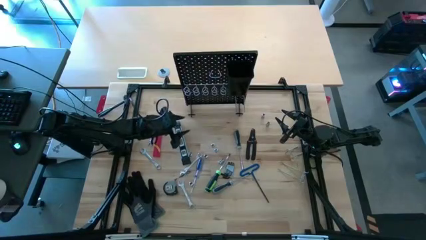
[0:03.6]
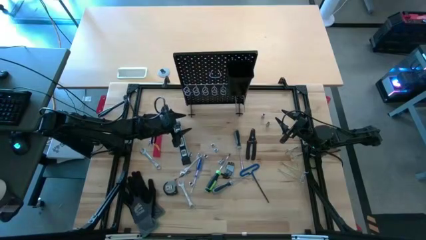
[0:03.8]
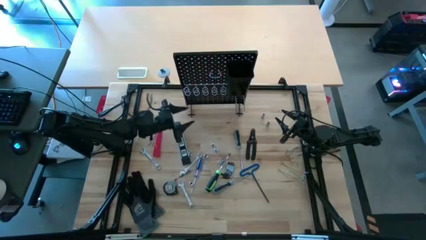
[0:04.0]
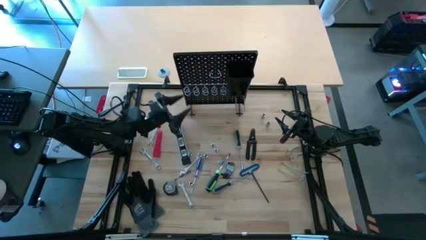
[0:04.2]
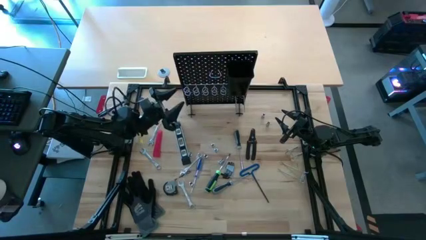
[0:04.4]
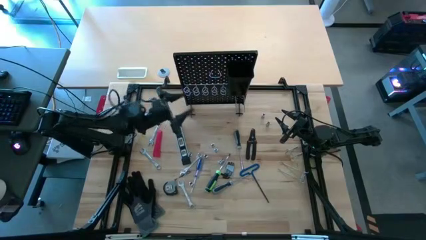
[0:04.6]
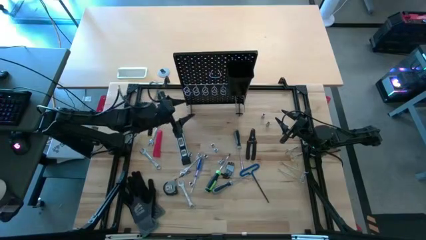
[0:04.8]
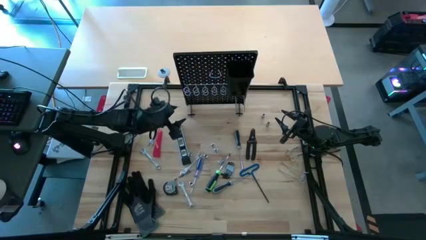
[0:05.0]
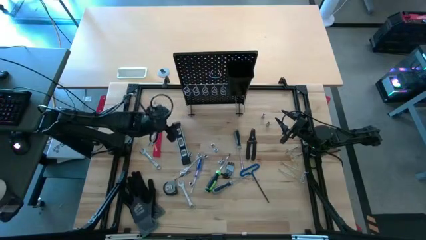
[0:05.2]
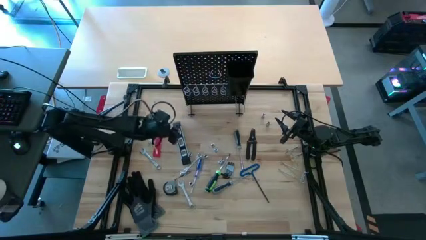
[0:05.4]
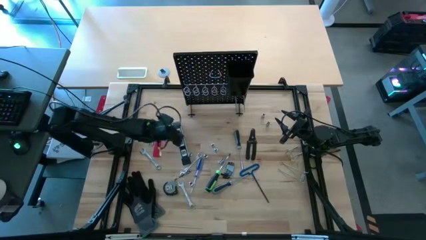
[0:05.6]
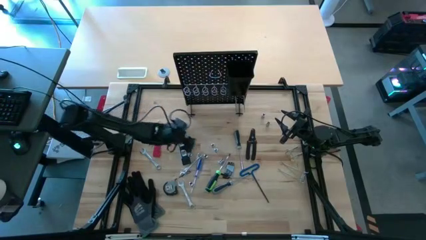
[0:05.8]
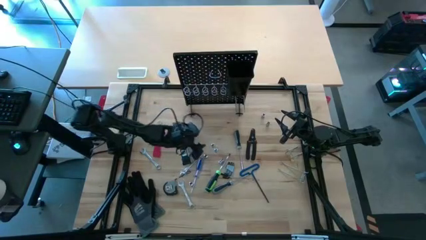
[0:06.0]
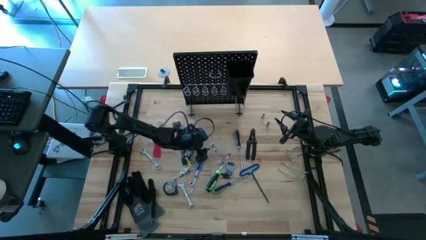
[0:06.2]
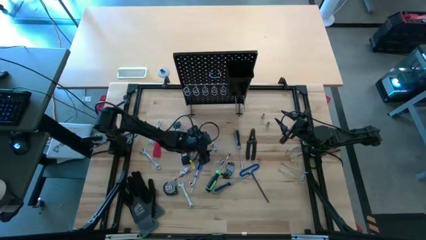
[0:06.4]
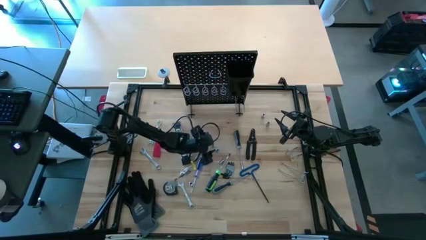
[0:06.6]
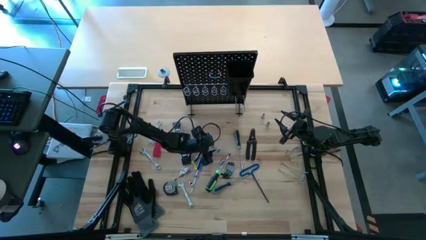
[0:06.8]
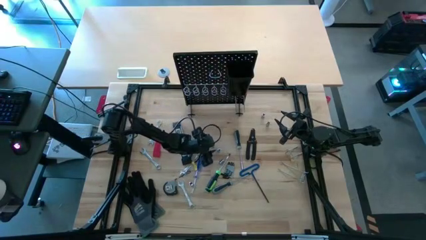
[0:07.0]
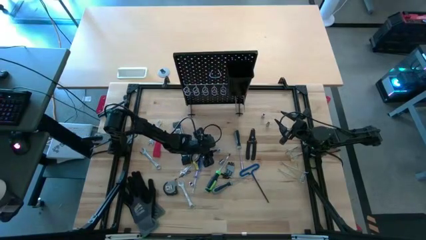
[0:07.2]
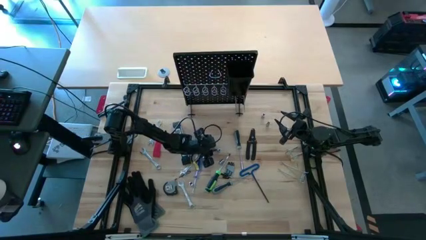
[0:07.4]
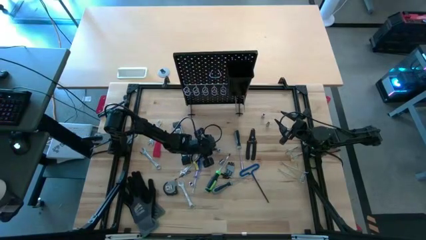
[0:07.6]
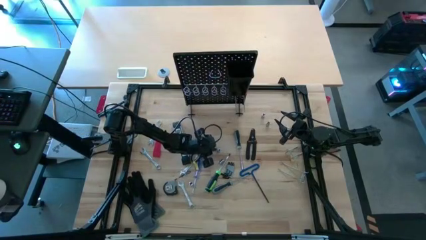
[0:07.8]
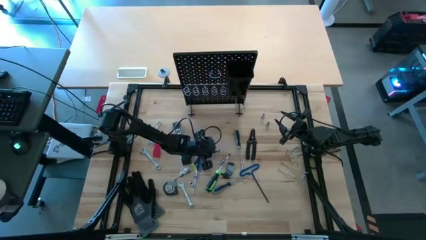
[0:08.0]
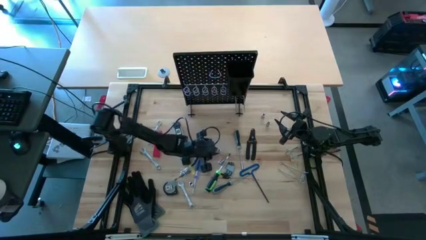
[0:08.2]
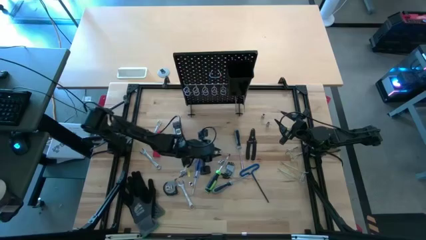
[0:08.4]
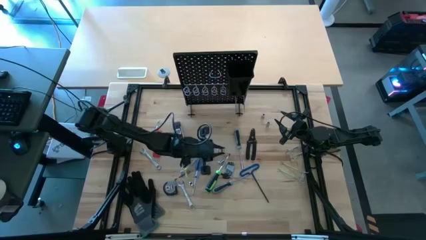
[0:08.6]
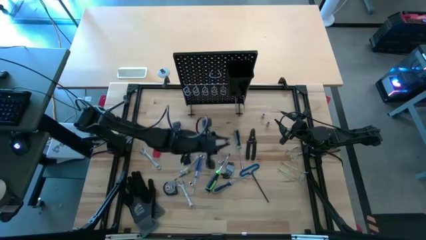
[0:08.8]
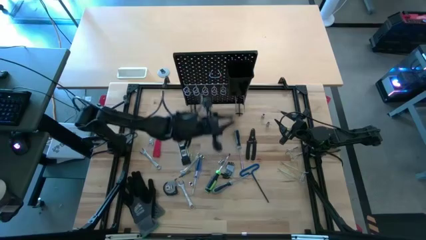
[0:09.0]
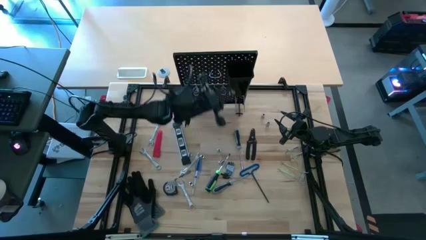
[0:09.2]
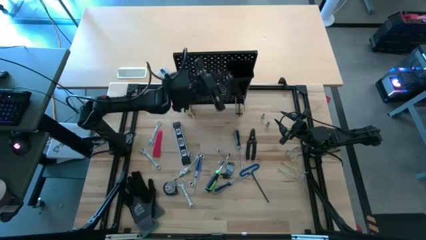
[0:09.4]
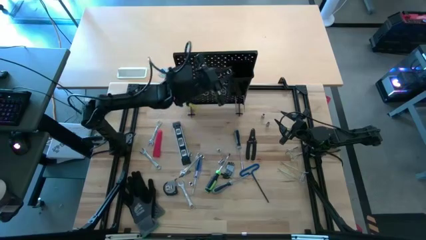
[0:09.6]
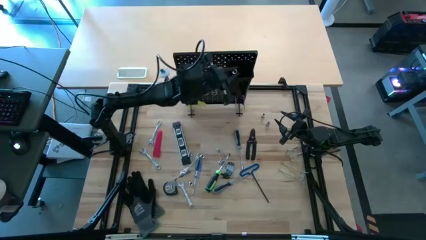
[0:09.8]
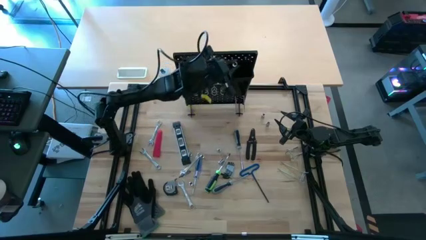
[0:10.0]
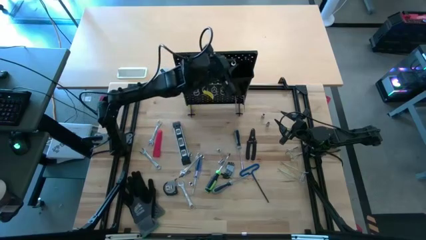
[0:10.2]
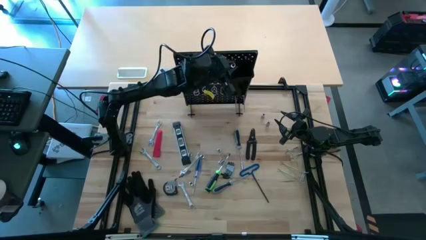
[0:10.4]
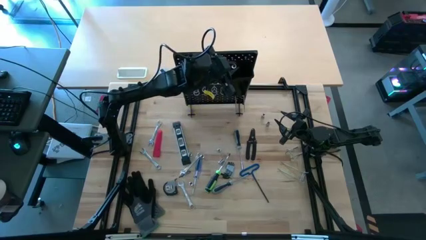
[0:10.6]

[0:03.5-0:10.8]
Task: Hang tools onto peg board
Put the socket wrench into the pegboard bin

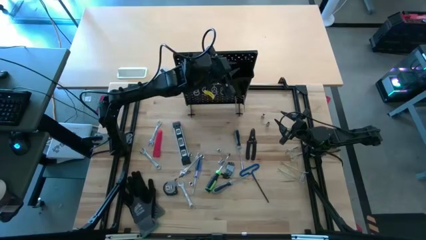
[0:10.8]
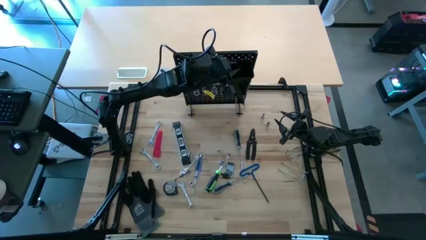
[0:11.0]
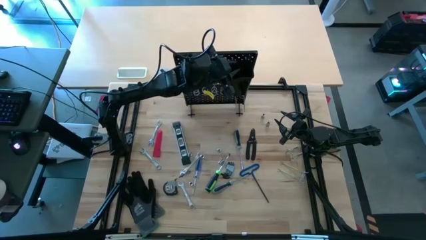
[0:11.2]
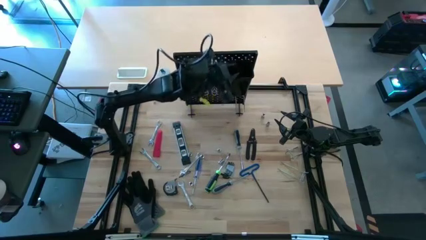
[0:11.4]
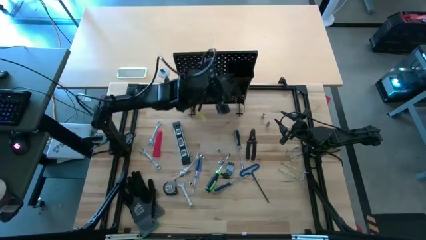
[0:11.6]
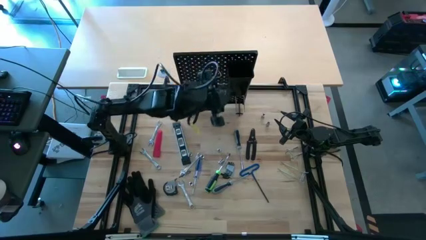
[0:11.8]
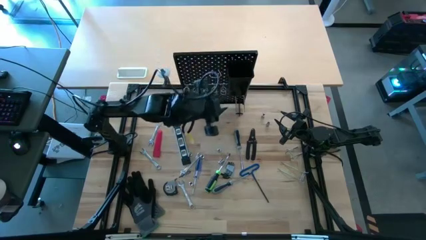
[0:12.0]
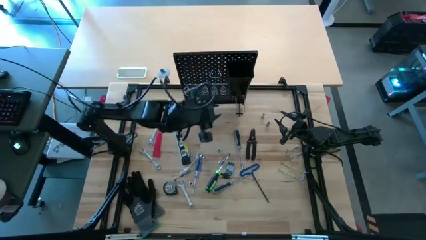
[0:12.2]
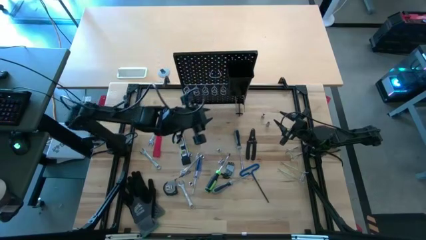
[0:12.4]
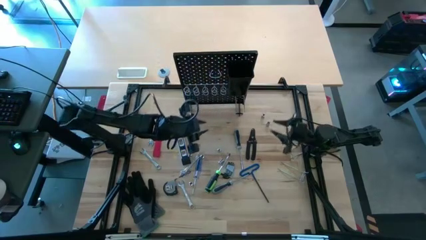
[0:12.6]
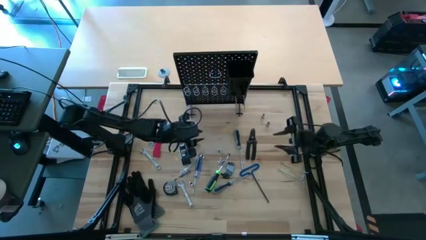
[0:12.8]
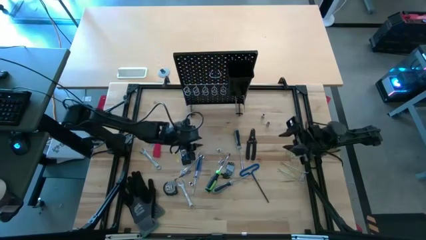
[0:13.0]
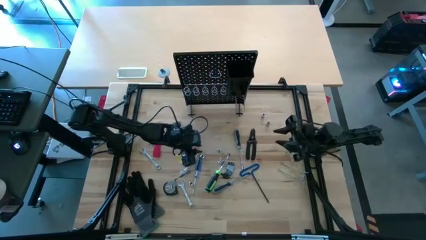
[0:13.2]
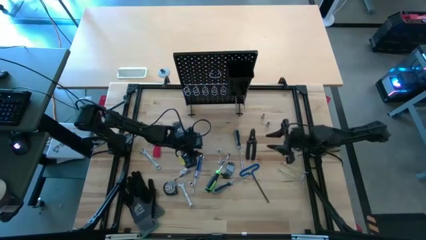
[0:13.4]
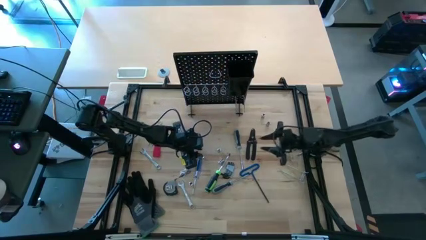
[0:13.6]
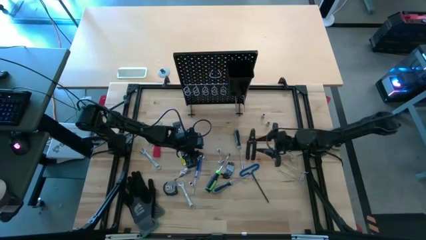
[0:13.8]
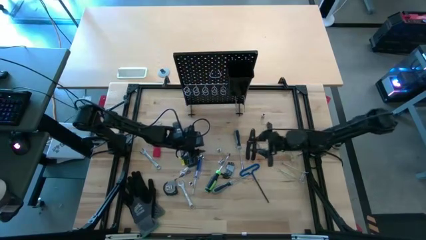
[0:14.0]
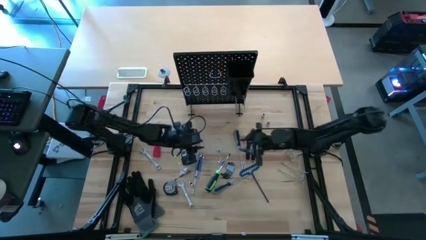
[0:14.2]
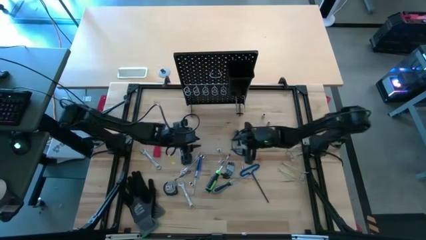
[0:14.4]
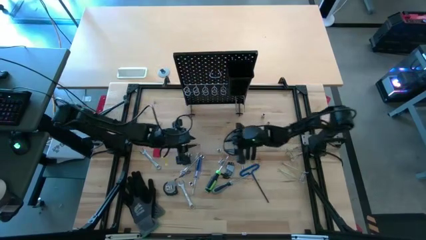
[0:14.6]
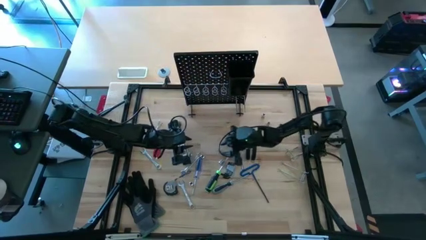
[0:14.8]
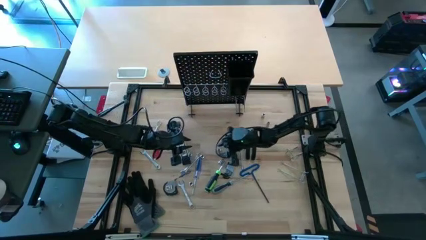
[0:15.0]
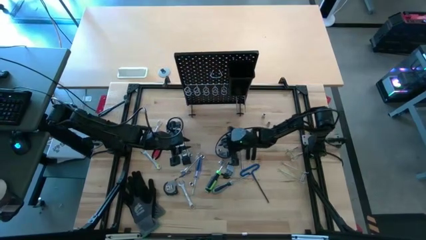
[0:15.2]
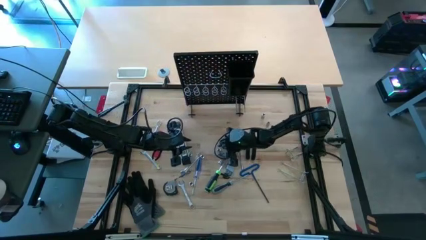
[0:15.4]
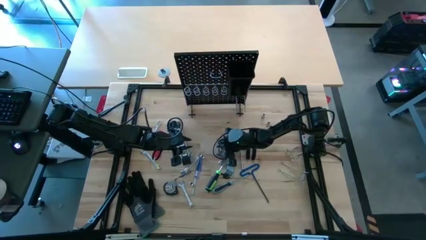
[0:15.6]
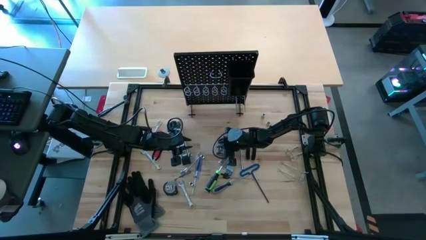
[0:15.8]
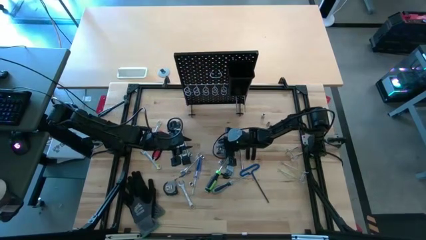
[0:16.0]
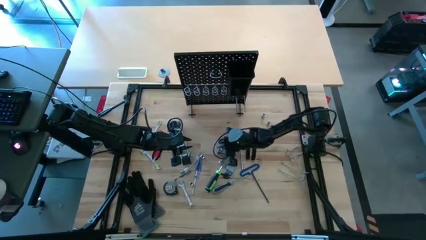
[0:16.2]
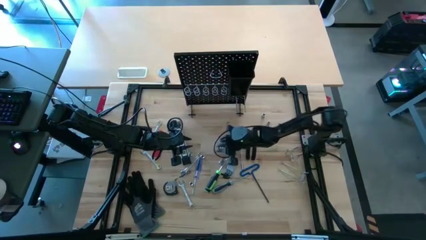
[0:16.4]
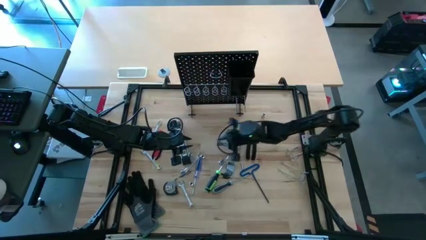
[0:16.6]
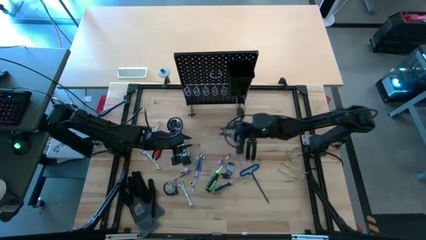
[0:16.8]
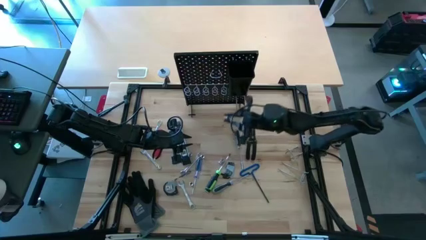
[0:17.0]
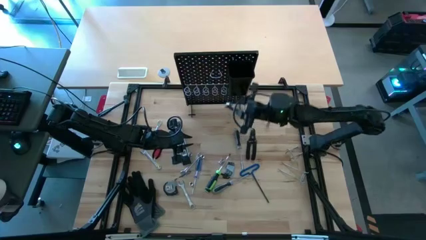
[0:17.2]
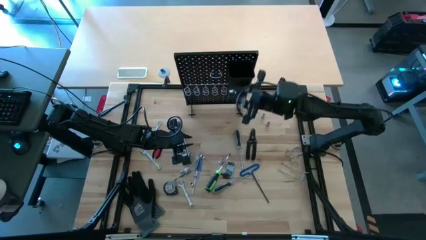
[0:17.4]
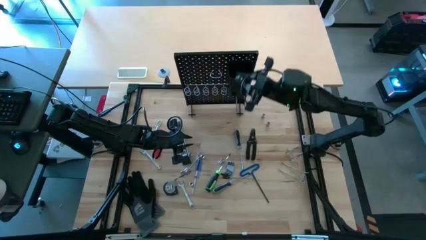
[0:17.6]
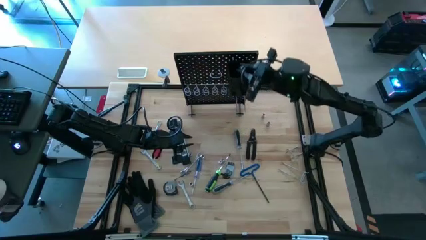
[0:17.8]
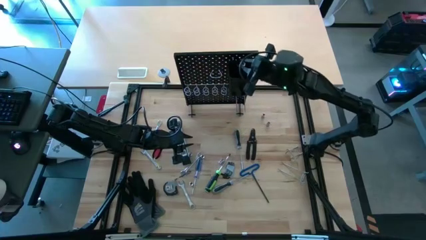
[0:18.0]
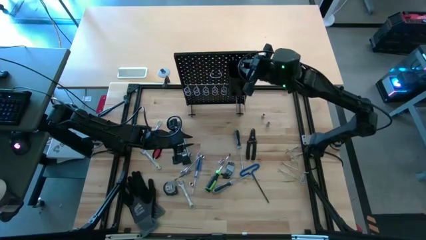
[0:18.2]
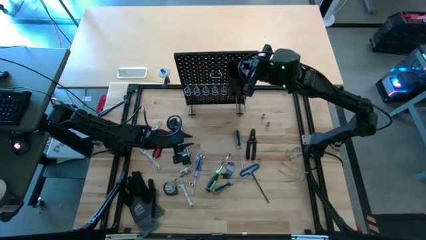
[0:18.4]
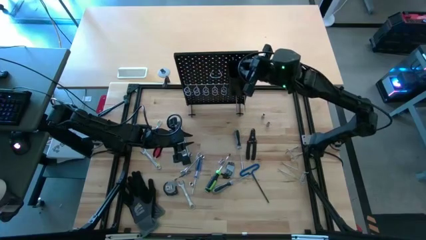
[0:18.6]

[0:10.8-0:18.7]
Put the socket wrench into the pegboard bin

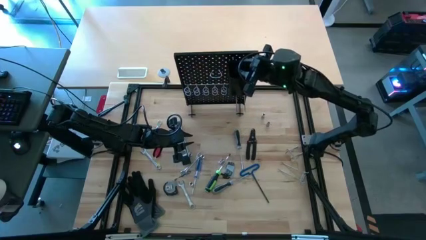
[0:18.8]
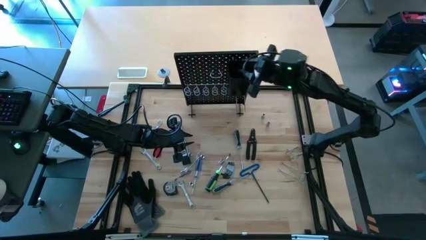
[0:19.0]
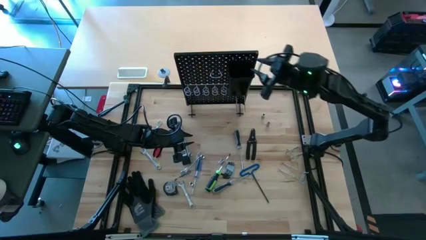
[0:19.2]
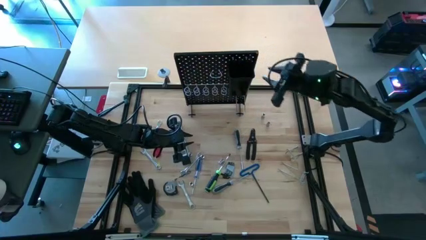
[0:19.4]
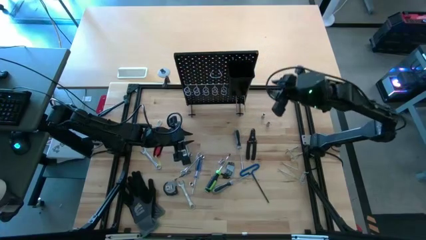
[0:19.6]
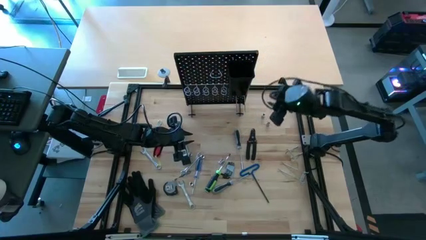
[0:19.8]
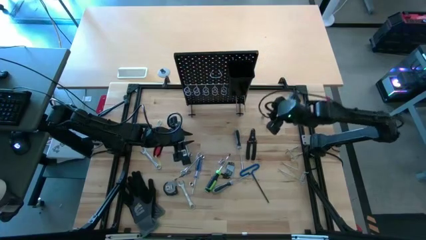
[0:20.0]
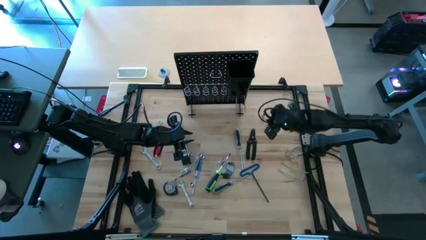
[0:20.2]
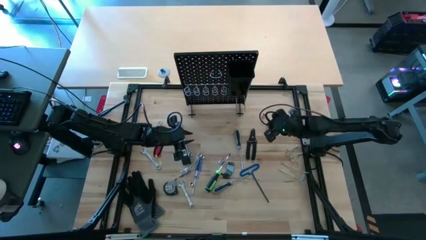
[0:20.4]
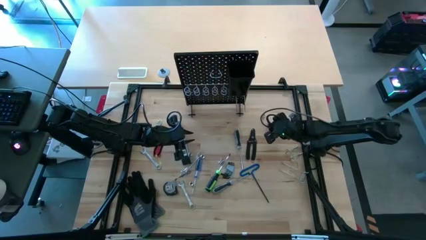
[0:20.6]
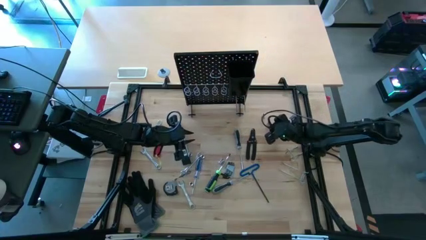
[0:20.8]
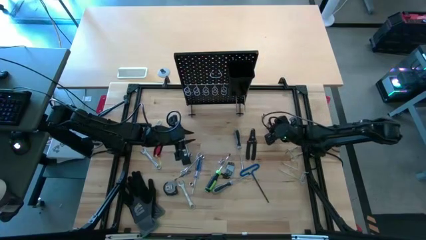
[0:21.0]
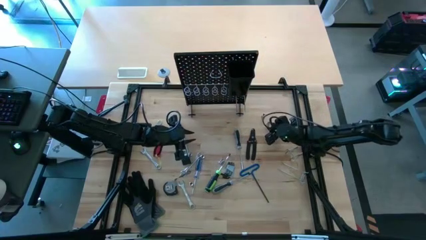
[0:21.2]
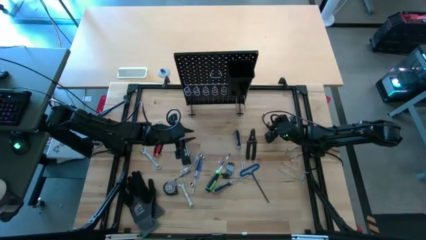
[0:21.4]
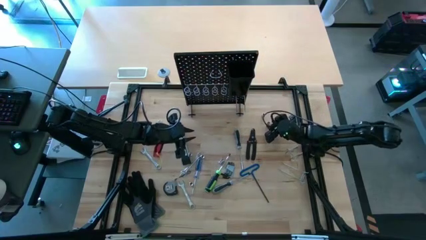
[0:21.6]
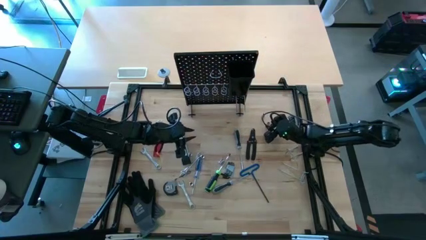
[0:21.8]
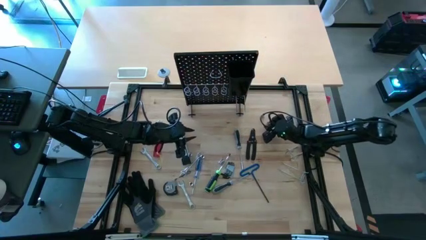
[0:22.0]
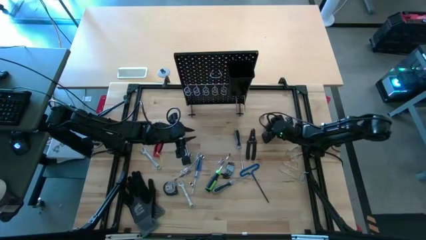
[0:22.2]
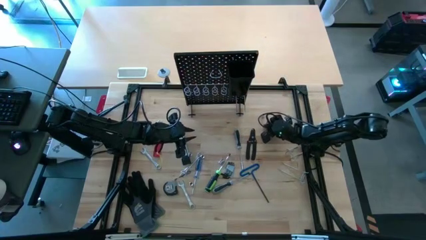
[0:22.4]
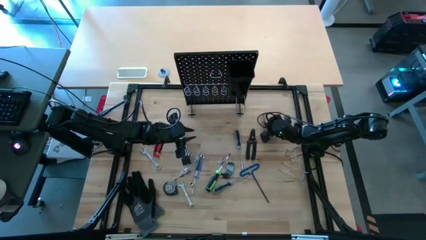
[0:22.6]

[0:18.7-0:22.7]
Put the socket wrench into the pegboard bin
